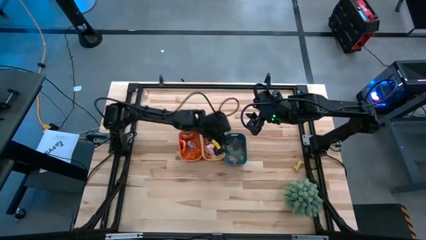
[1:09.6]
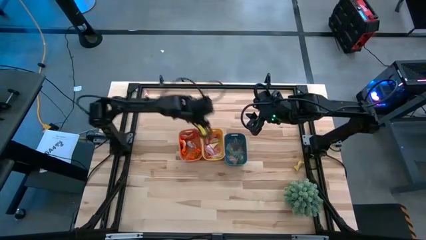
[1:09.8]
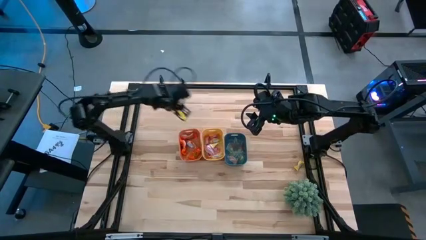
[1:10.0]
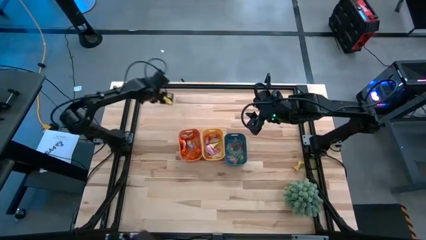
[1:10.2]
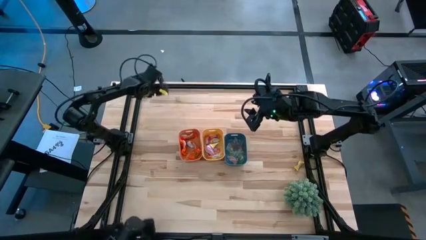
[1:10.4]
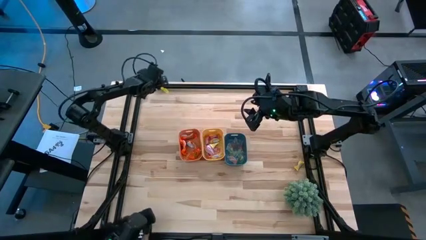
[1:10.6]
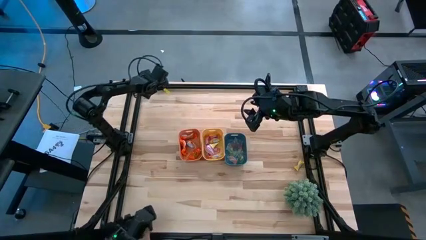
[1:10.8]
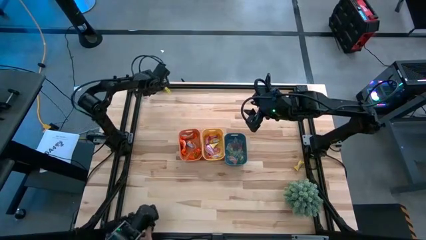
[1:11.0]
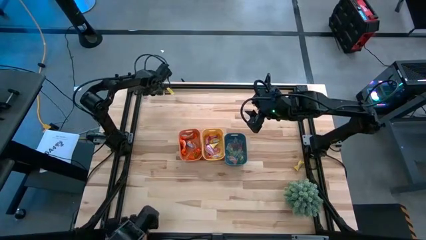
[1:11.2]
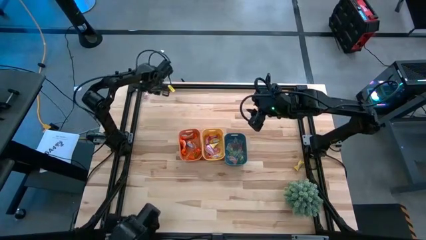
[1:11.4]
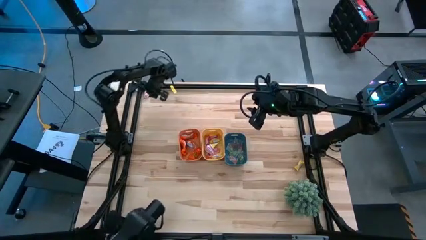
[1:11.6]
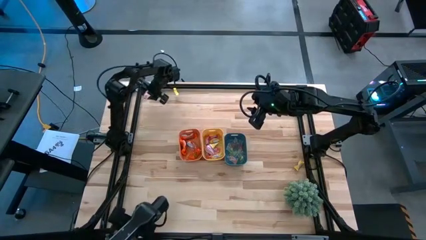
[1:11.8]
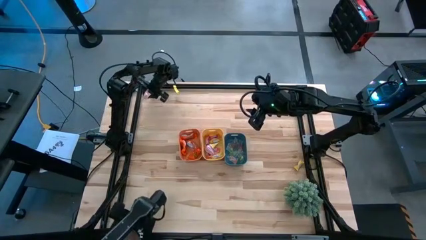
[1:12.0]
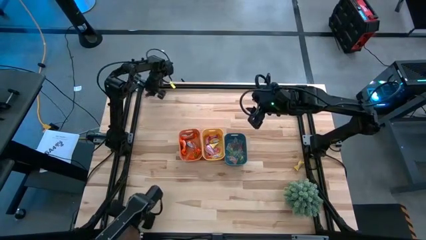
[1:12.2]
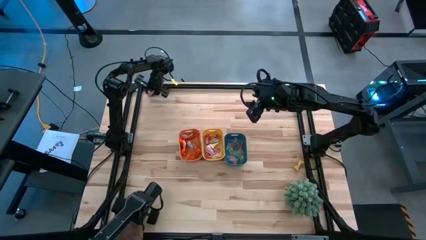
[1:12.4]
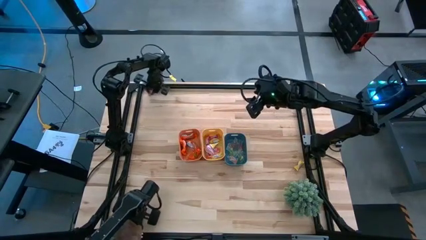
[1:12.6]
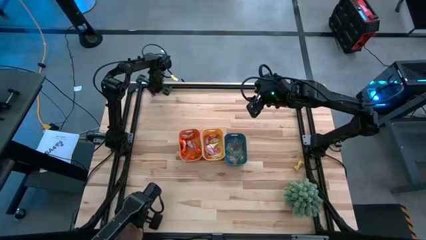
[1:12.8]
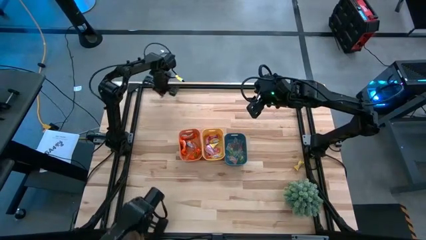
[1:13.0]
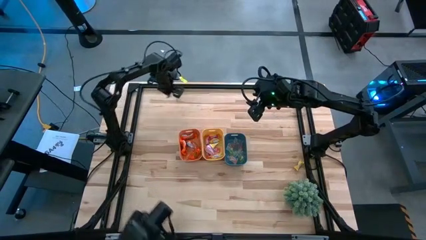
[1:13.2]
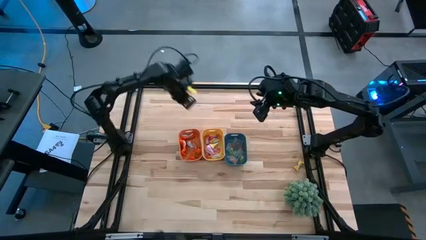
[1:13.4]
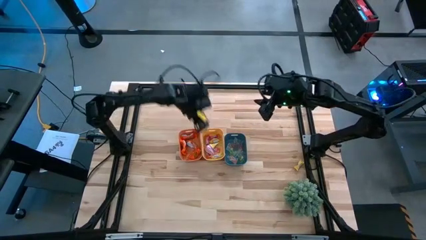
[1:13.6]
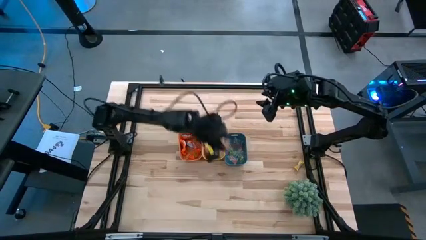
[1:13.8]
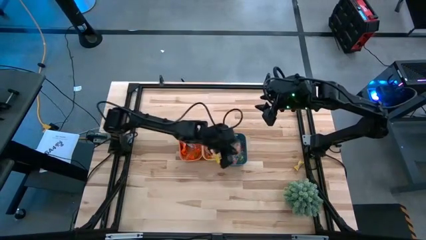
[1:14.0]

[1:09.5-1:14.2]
Task: Sort candy
Put the orange gummy into the blue bin

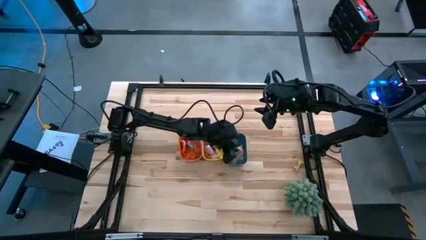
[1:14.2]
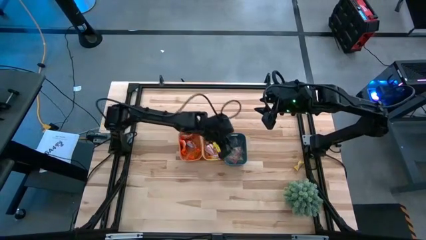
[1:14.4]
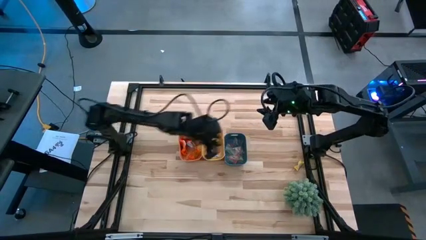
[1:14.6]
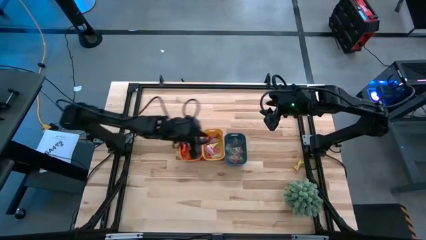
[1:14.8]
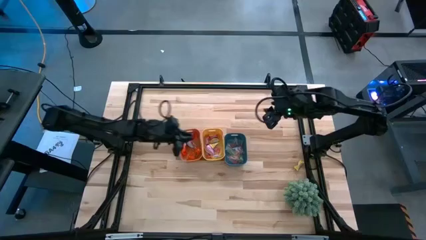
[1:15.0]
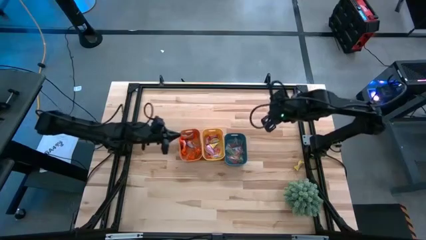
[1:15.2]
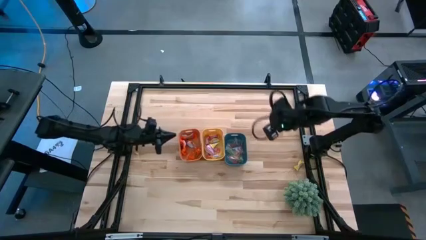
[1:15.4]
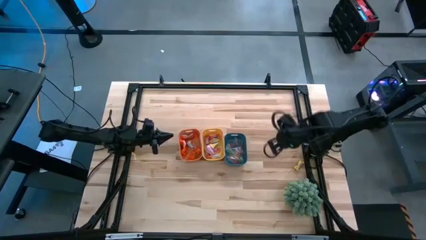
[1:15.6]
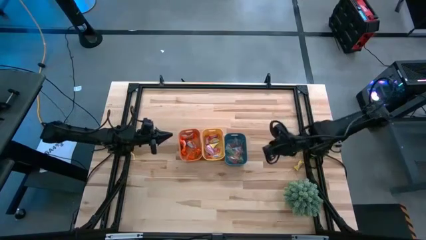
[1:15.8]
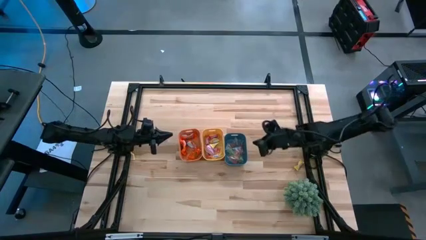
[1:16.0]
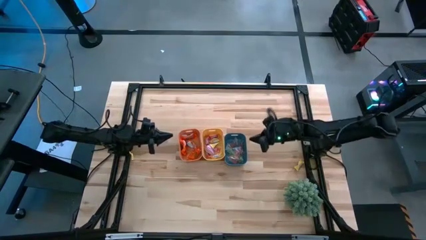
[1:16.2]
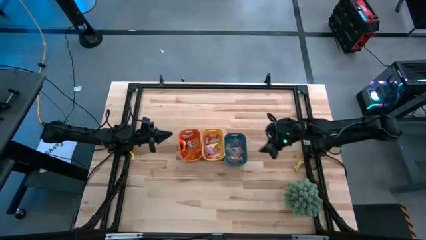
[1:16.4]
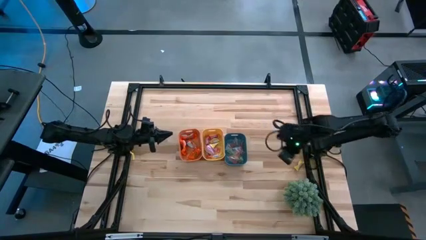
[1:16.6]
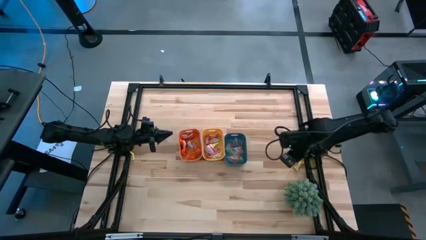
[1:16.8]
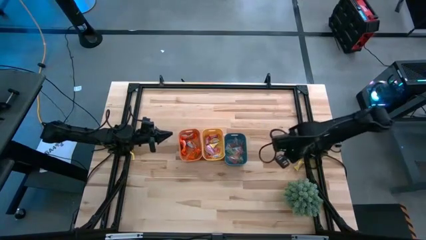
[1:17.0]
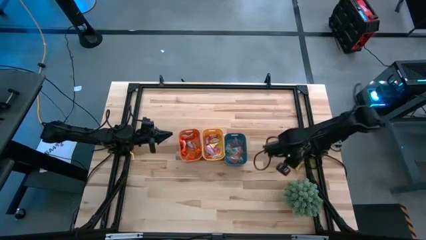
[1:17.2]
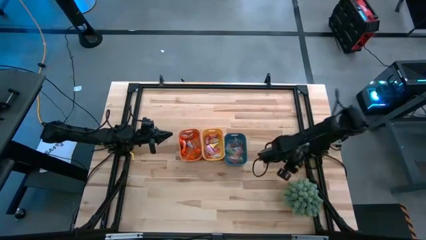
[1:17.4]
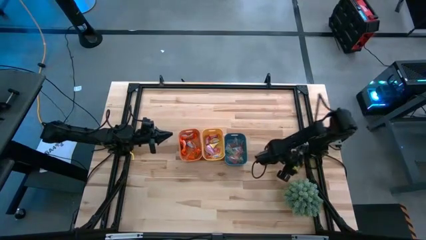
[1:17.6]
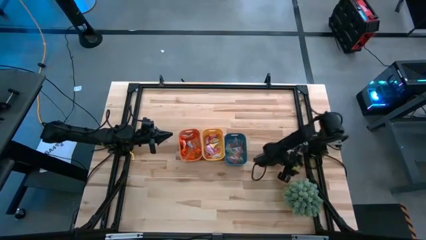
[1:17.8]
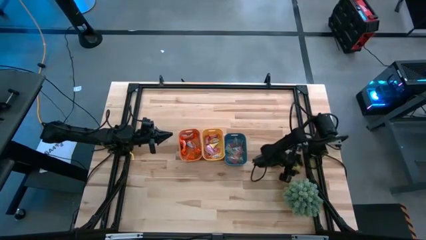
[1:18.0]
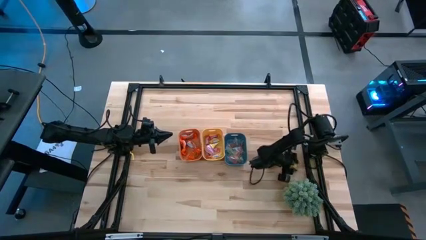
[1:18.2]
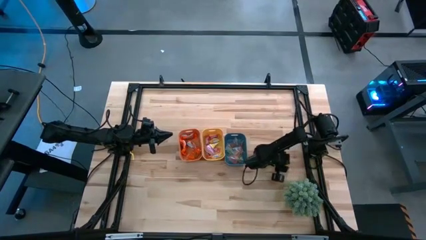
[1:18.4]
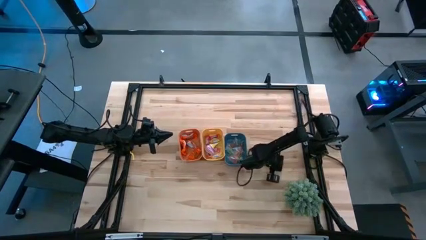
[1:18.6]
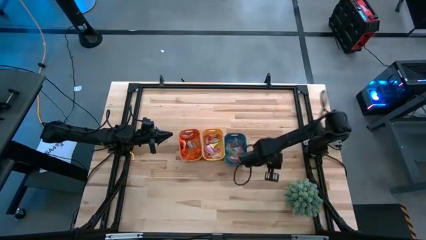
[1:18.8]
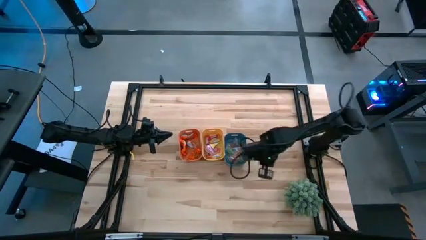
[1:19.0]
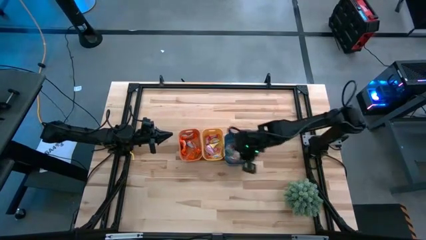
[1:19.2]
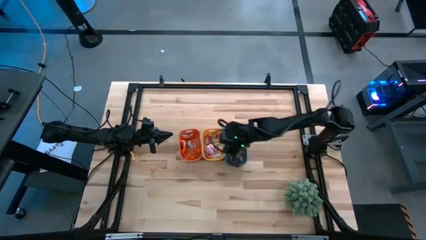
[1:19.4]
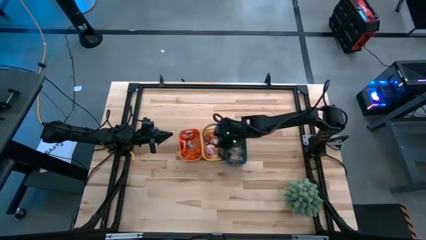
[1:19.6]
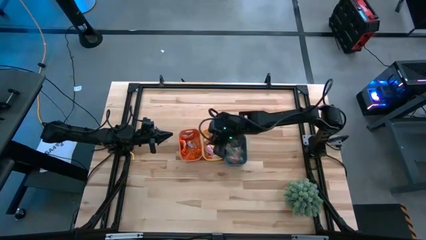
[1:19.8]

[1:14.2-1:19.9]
Put the yellow candy into the yellow bin

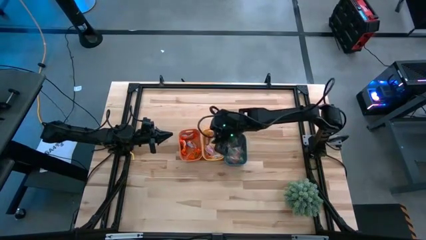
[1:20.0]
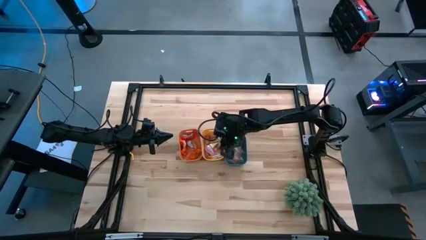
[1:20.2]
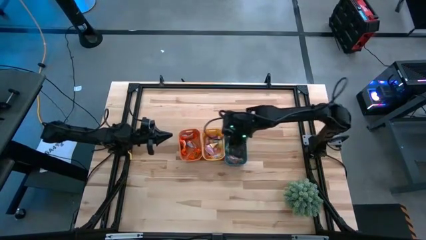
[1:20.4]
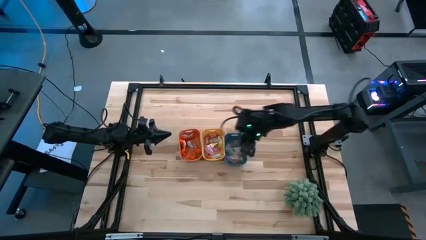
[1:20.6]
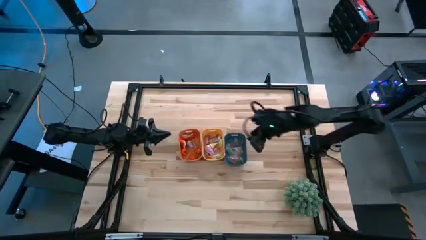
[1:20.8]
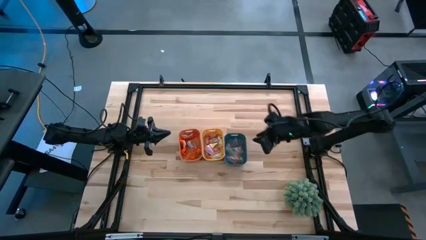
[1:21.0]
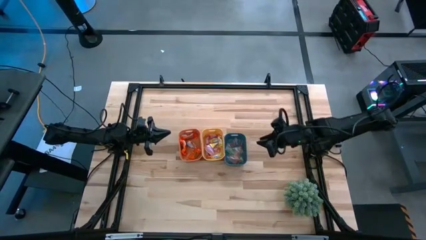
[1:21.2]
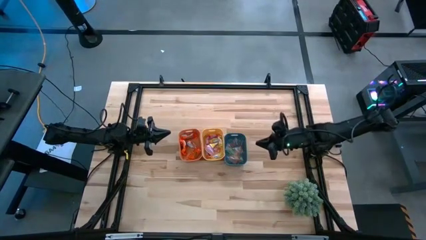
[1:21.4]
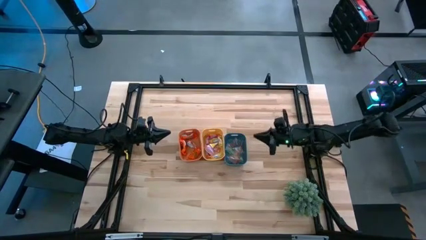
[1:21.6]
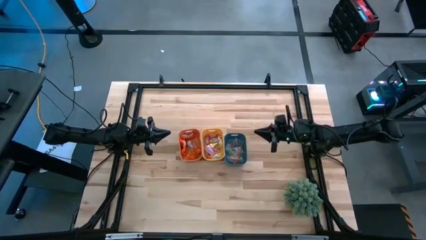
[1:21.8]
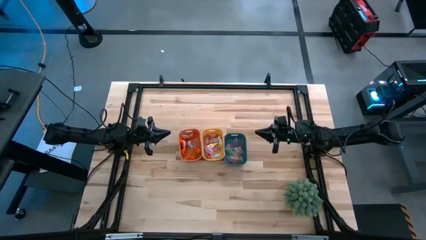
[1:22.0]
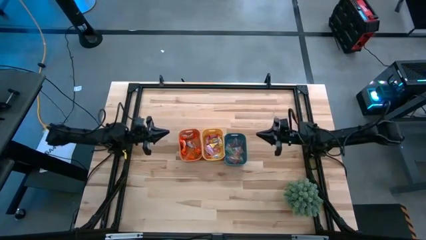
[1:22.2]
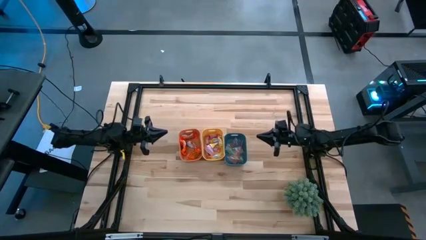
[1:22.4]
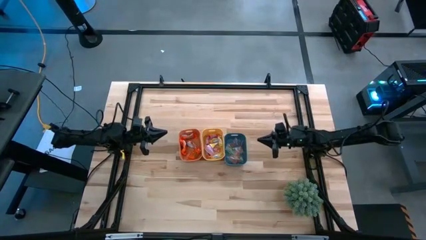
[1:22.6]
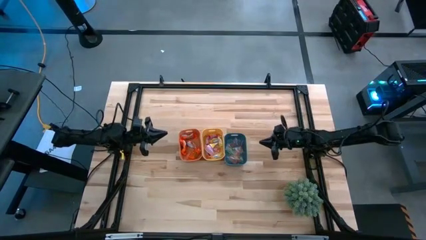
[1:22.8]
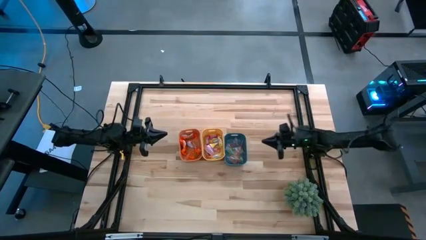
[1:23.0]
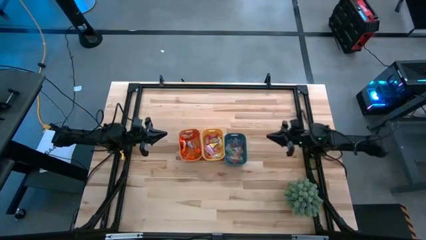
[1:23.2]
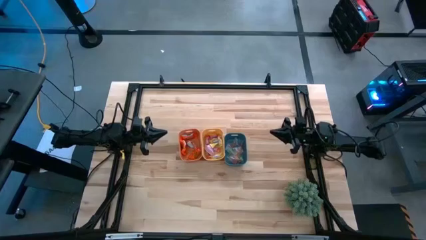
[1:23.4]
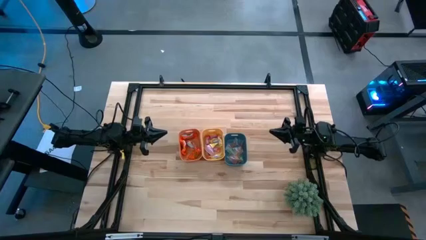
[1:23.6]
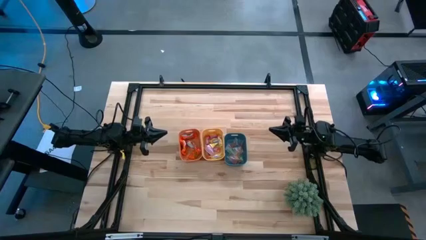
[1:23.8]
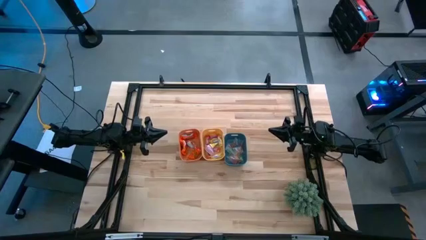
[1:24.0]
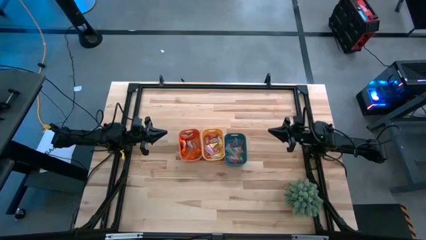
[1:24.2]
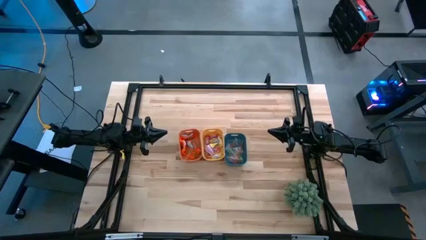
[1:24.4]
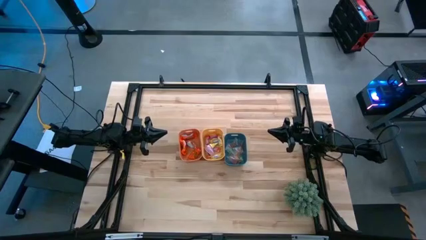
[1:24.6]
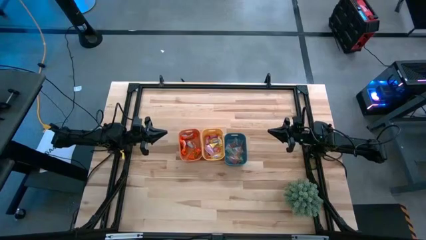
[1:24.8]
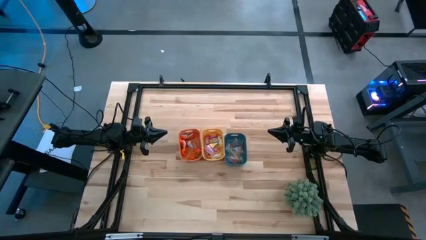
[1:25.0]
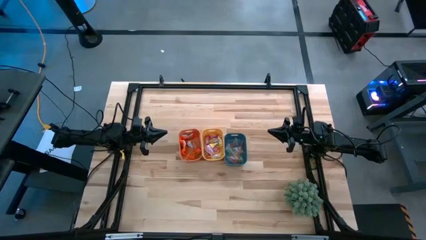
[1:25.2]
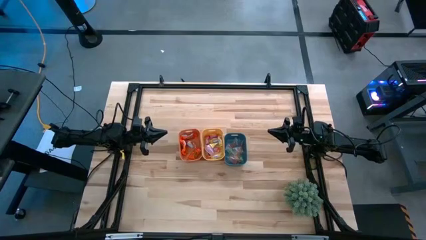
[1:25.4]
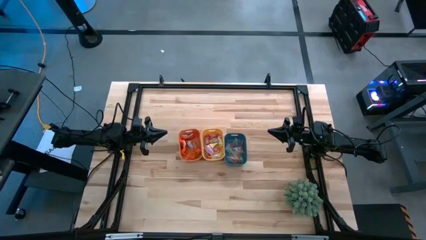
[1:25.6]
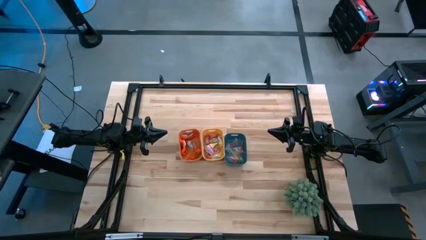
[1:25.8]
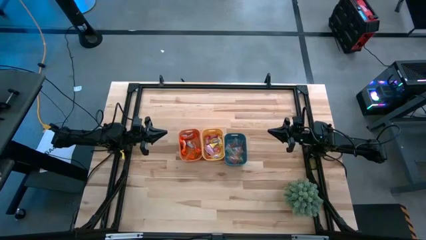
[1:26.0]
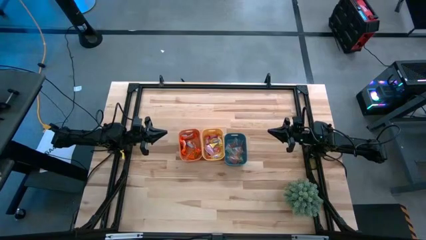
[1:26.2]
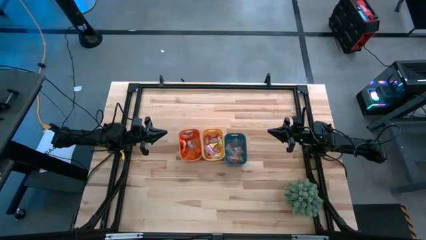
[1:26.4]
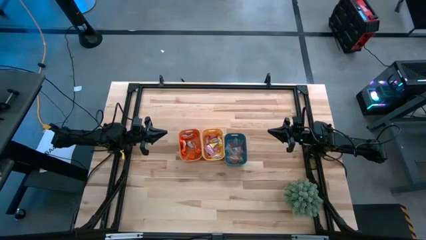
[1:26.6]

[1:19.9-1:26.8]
Return to Home Position
